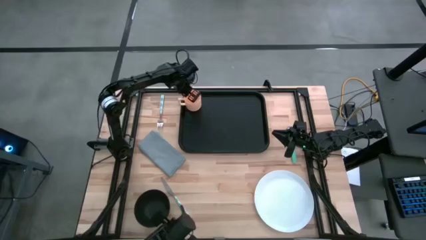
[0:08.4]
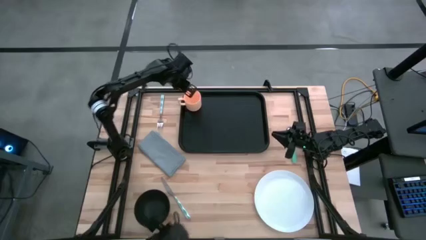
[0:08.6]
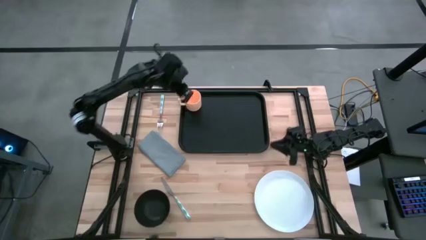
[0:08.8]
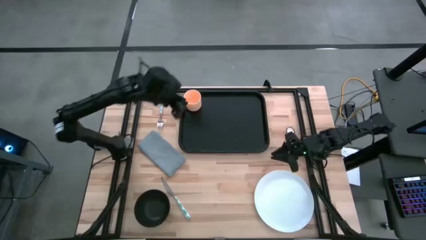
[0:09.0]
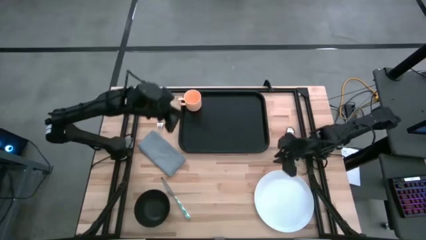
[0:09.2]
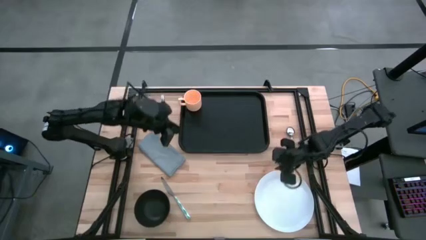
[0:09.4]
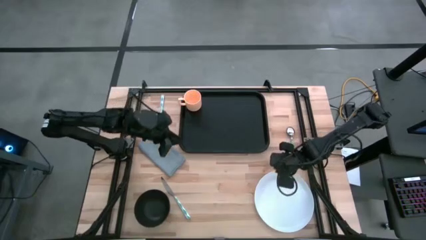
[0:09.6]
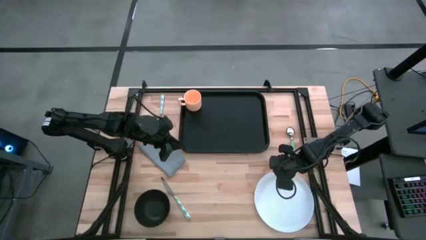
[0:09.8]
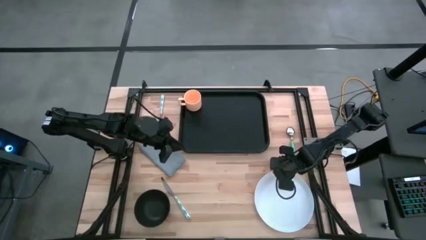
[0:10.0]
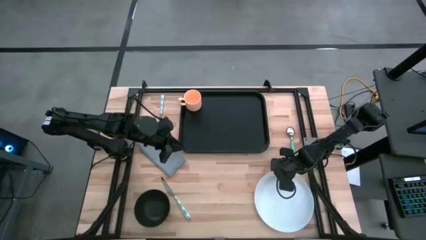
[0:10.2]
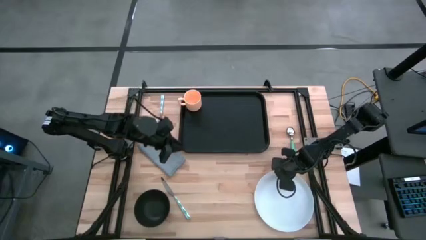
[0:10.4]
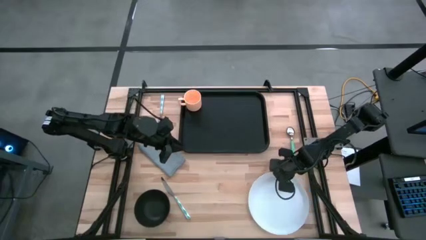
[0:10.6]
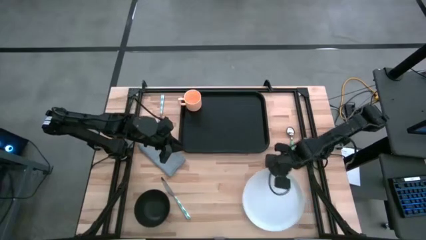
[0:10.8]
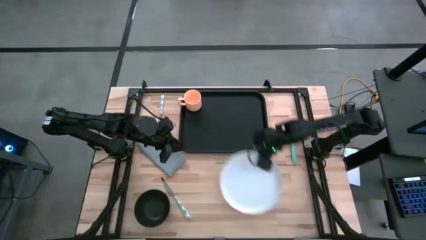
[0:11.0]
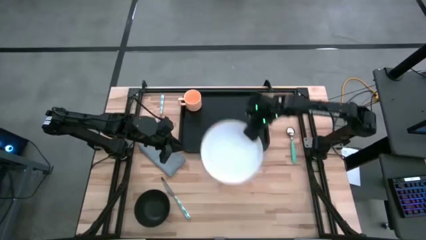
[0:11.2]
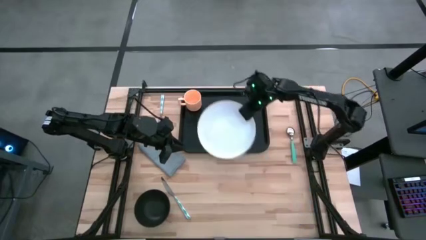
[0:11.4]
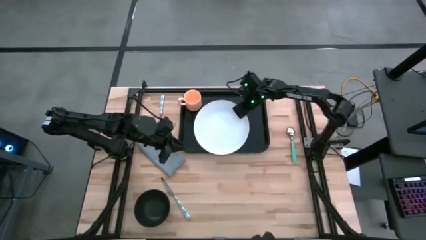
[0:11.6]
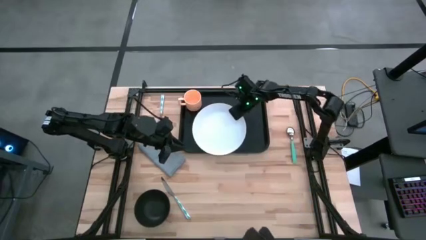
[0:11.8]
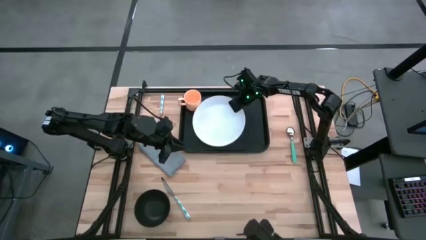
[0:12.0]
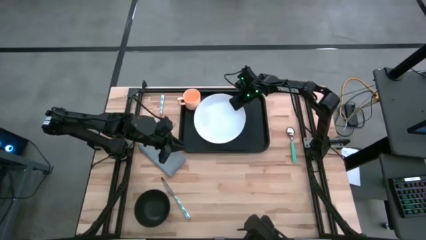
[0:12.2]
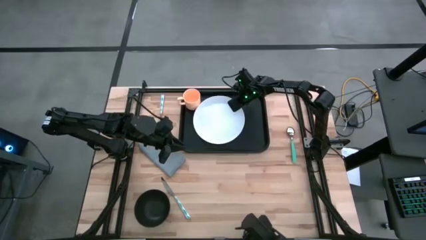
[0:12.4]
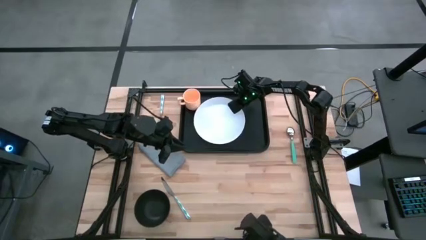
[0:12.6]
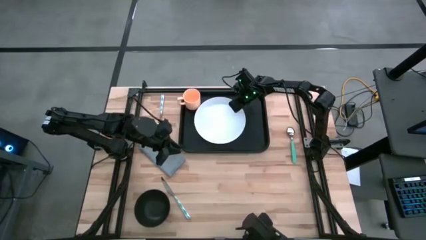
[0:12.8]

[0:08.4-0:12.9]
Task: Set up tray
Put the white plate below the orange mug on the black tray

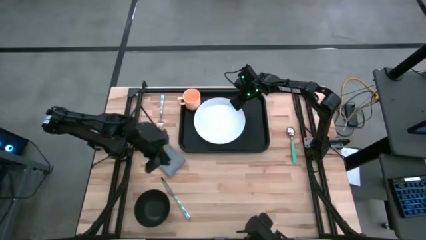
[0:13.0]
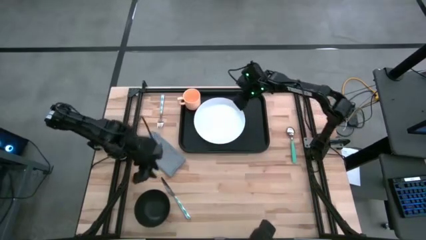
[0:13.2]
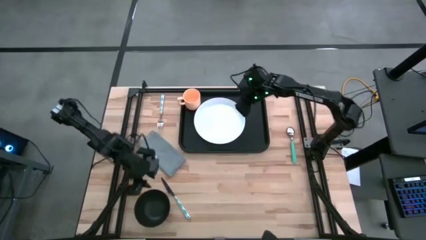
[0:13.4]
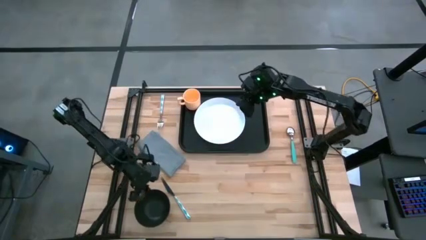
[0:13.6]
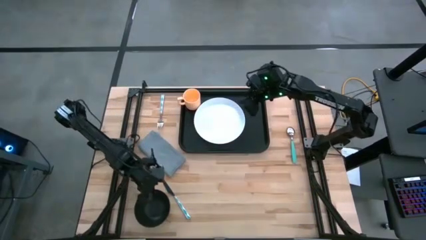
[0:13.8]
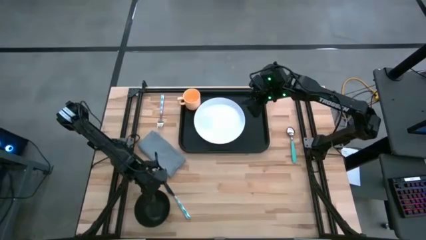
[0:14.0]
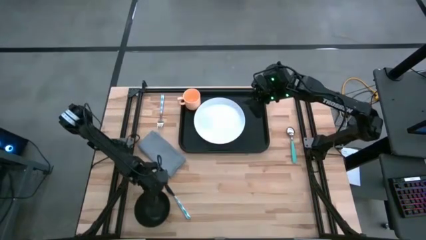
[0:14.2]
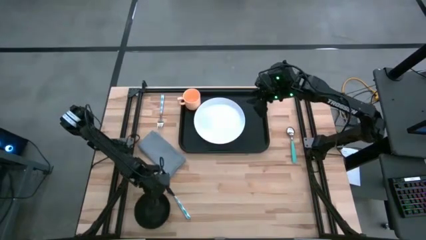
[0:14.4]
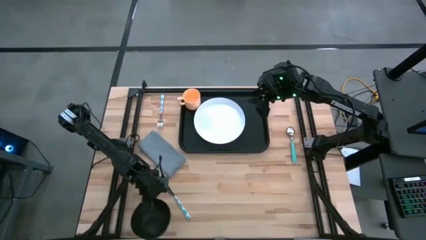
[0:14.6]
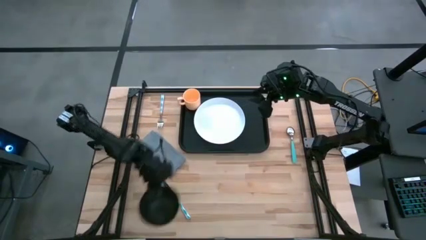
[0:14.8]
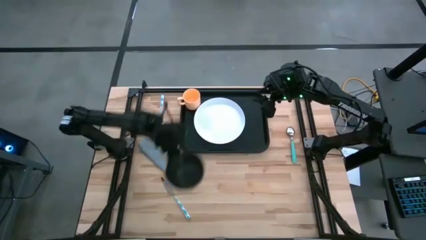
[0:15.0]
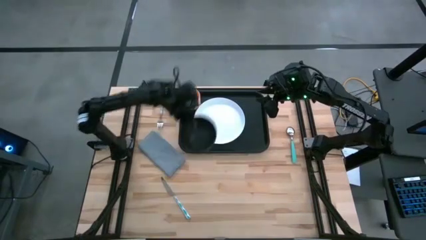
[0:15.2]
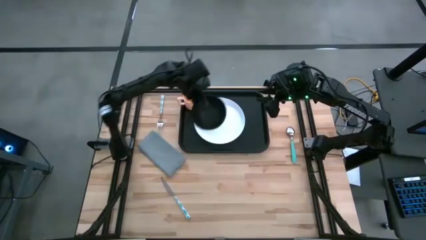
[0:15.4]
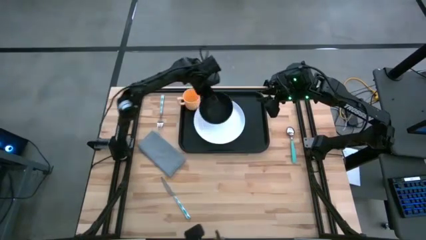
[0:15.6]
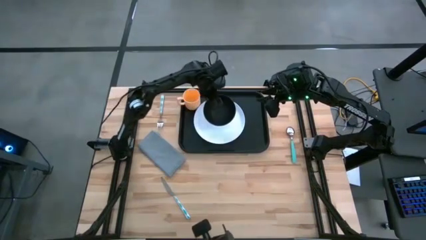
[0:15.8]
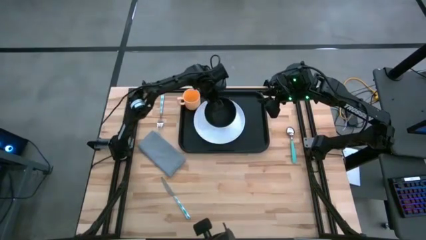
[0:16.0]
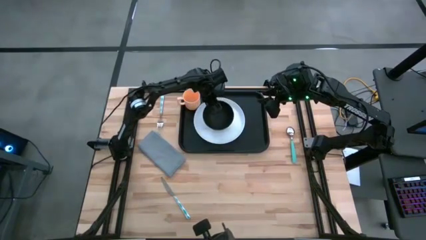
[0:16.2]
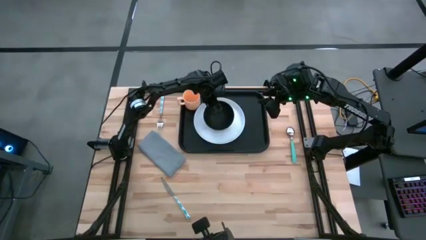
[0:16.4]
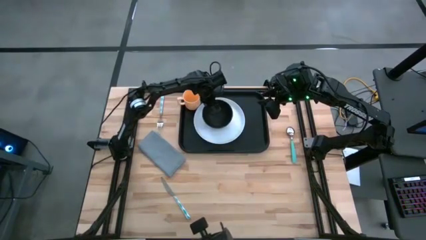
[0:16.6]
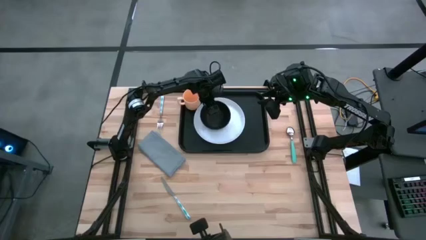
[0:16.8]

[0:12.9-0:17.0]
Put the black bowl on top of the white plate on the black tray

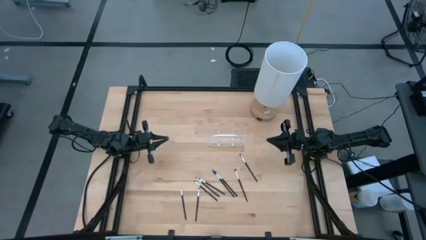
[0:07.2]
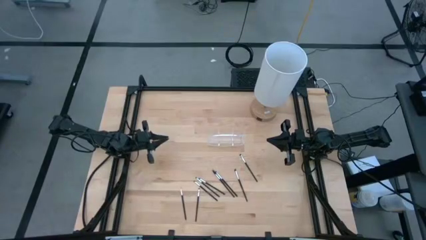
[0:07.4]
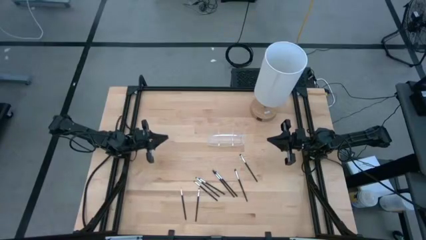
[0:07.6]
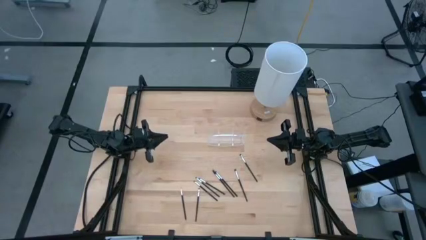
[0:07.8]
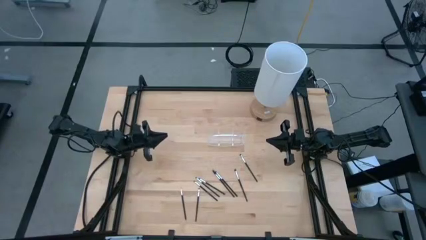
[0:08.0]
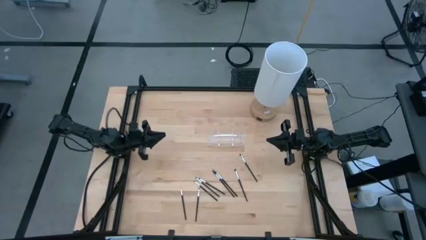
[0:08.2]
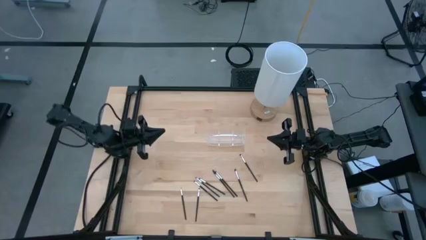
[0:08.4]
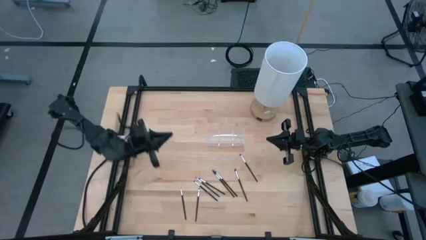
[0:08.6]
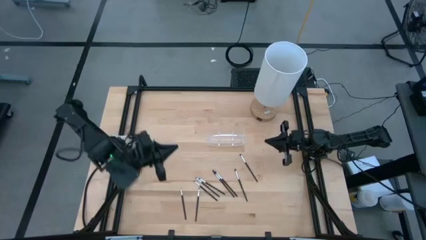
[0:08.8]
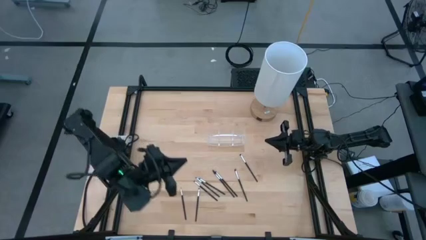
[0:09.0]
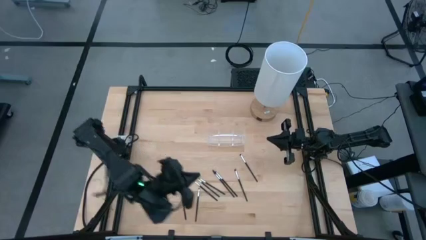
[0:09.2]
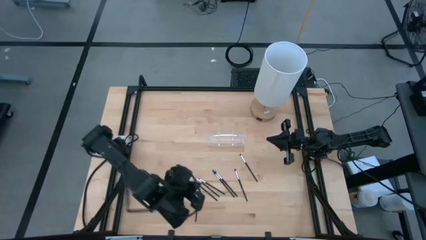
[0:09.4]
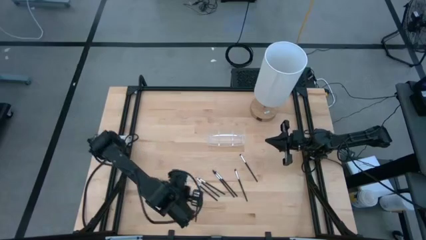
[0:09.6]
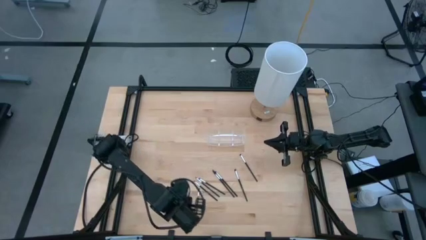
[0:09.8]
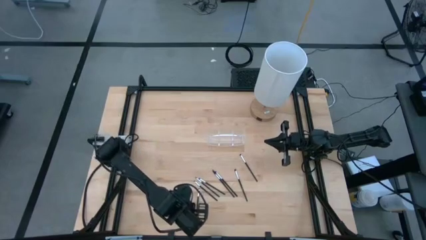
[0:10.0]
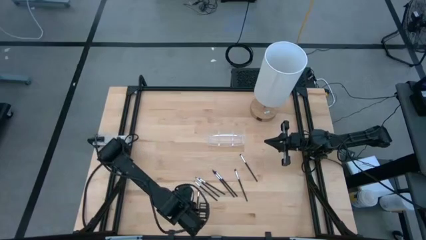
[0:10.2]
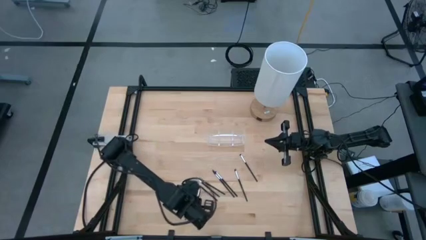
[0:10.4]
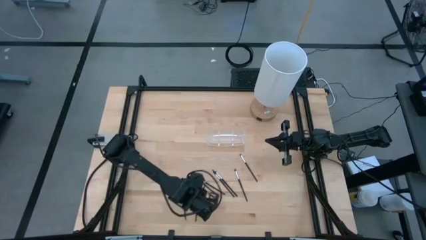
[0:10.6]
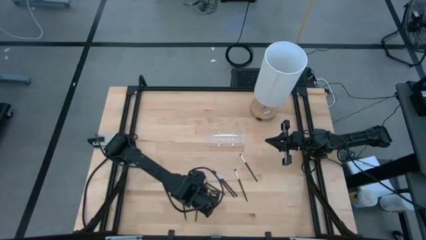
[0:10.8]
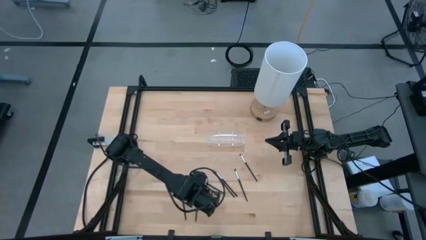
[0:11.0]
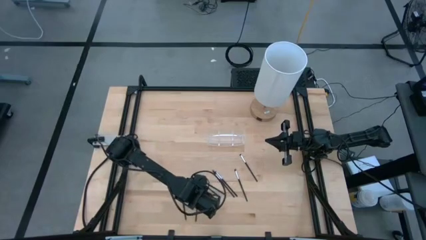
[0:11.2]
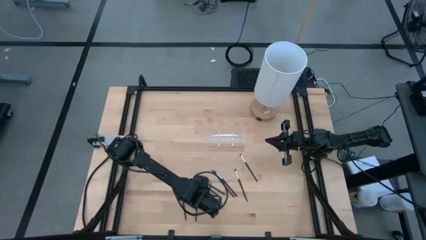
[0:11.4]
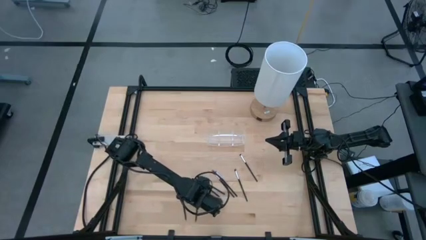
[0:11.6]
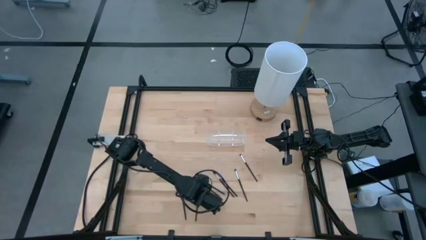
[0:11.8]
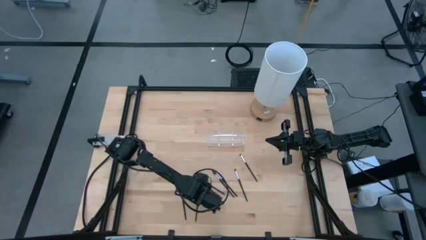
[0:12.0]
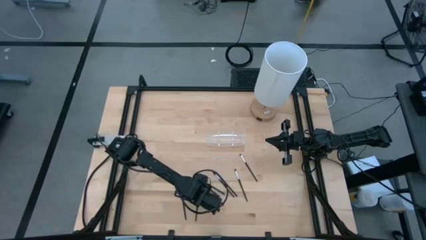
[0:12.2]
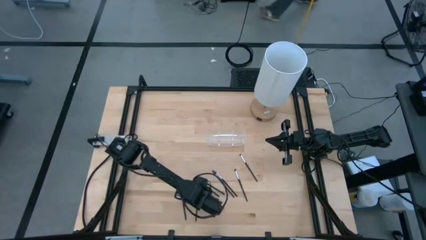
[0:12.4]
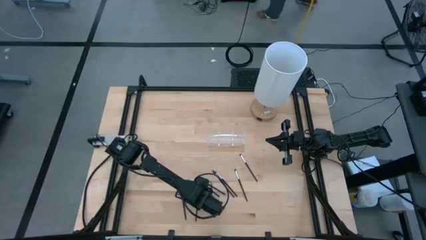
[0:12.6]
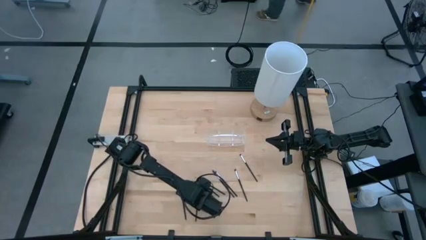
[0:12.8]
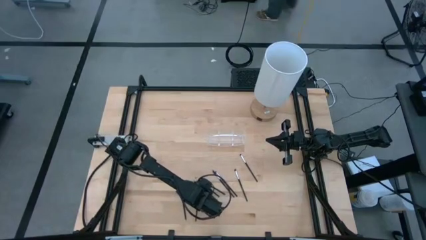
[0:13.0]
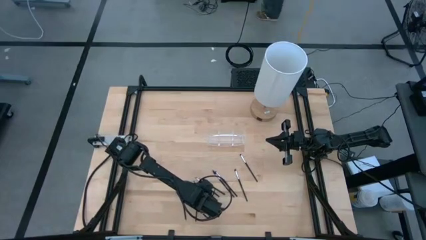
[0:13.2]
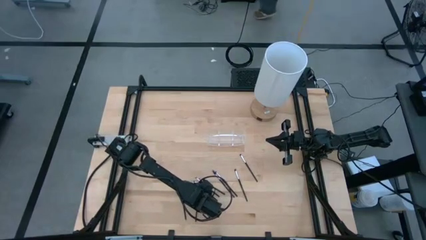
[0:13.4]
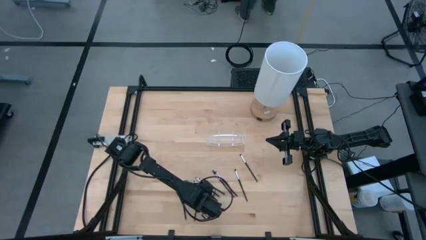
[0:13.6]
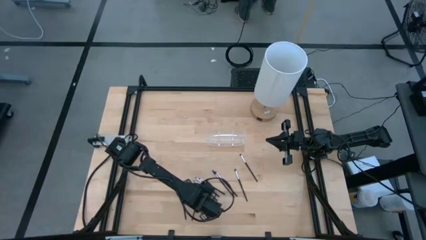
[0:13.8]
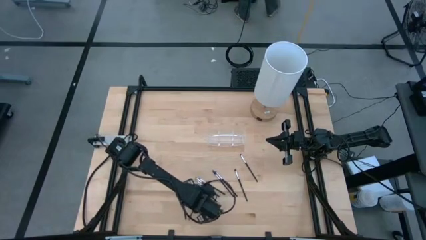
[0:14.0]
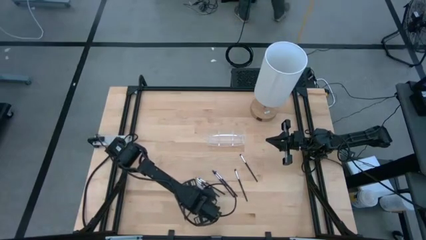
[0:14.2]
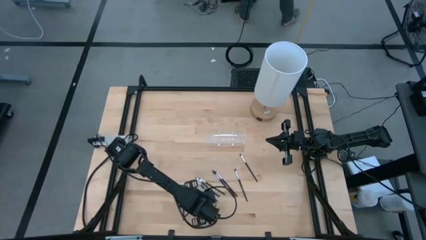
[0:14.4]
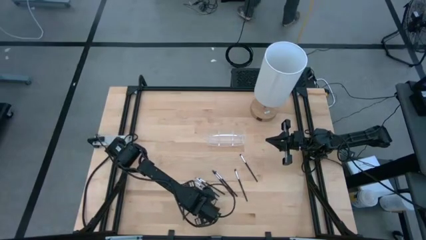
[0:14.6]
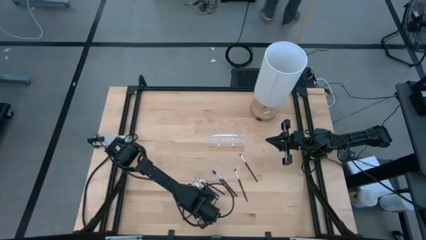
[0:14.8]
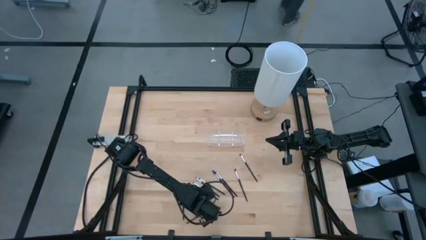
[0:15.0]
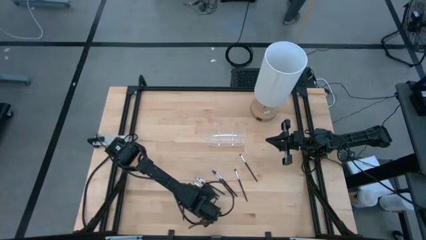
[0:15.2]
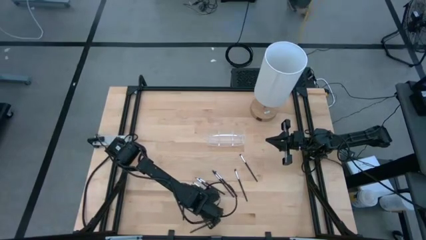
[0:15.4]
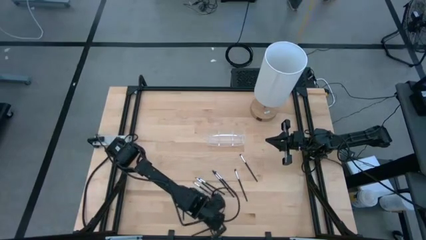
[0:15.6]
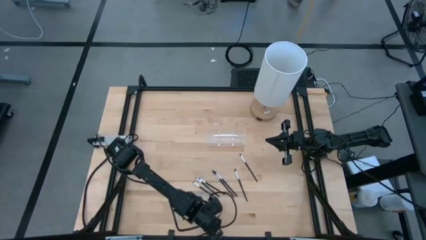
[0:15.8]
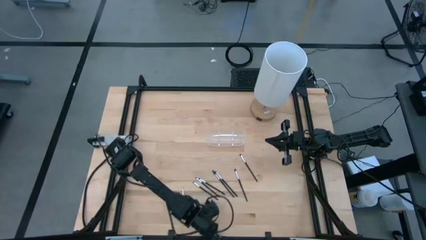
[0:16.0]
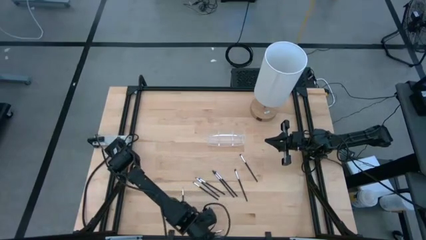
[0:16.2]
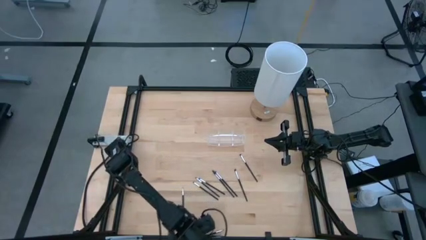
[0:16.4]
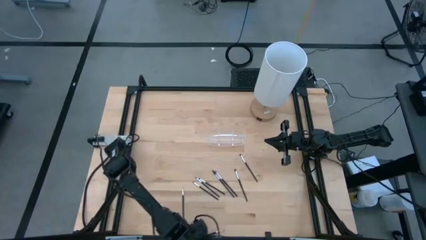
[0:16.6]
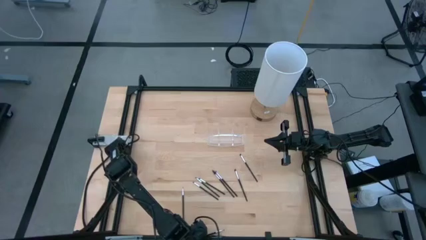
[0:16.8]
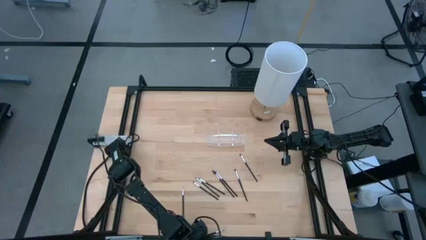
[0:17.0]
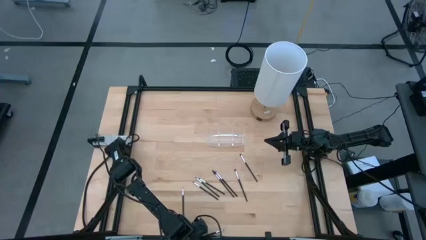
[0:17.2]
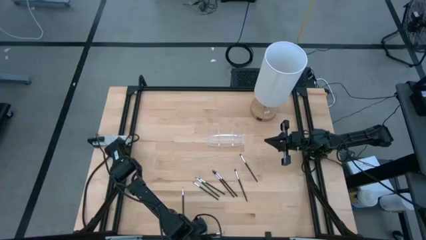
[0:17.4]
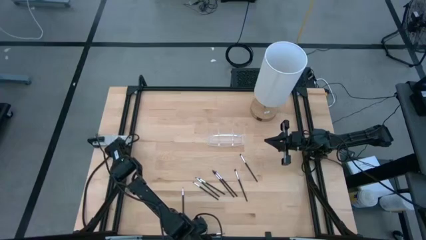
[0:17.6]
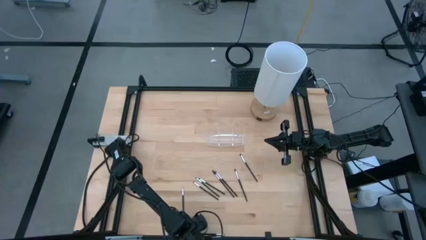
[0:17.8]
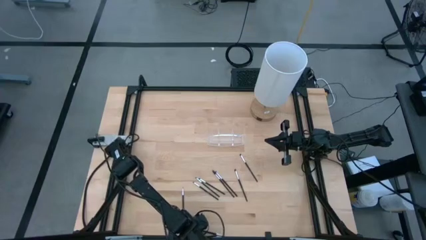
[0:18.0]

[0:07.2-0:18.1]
Task: Put items in baskets/containers
Put the black eyeshadow brush into the middle section of the transparent organizer
